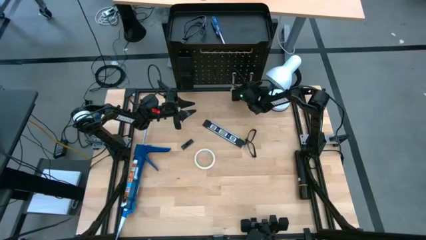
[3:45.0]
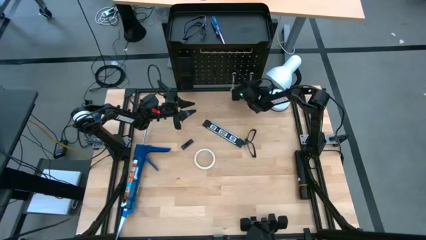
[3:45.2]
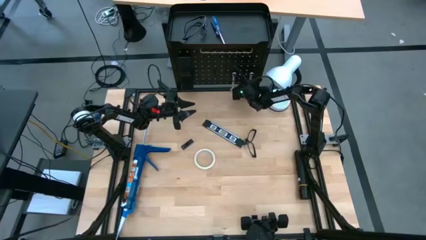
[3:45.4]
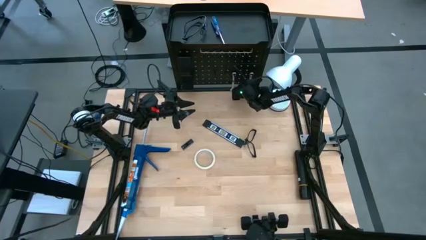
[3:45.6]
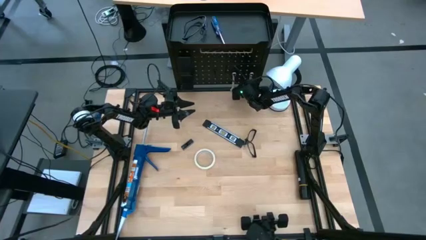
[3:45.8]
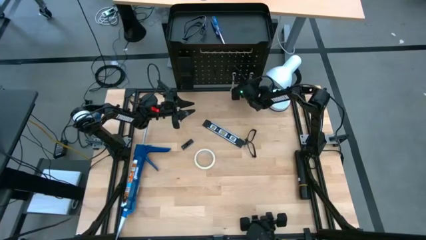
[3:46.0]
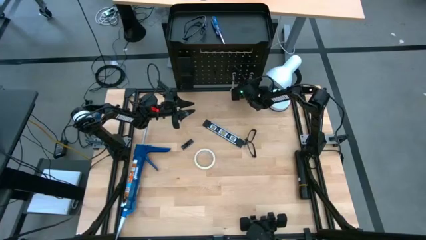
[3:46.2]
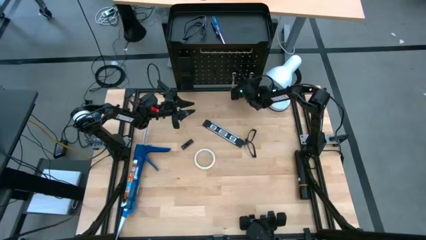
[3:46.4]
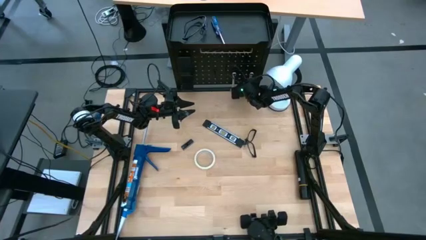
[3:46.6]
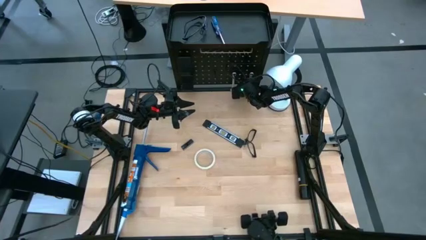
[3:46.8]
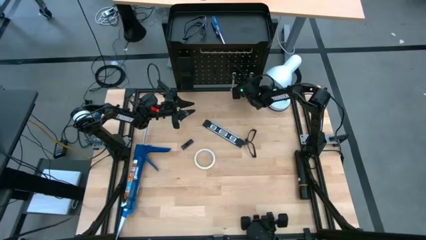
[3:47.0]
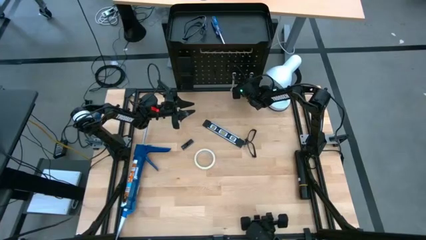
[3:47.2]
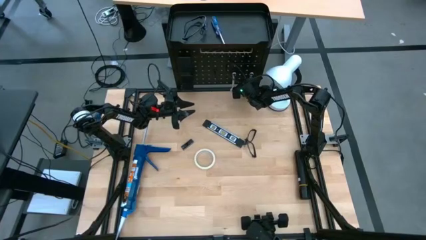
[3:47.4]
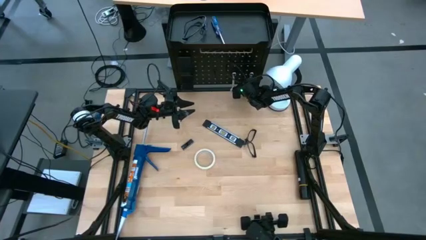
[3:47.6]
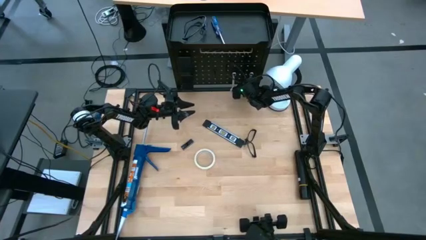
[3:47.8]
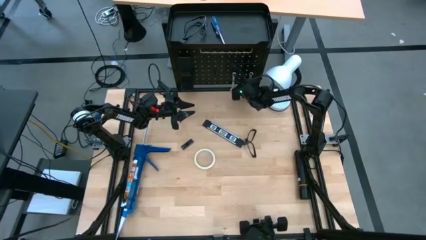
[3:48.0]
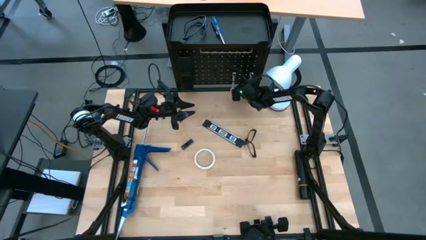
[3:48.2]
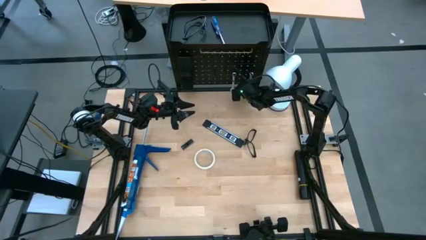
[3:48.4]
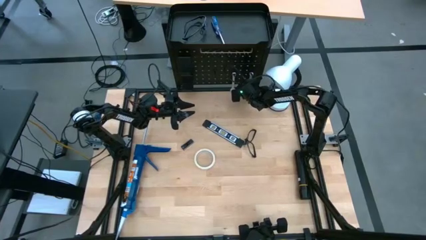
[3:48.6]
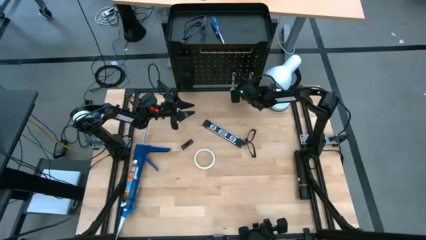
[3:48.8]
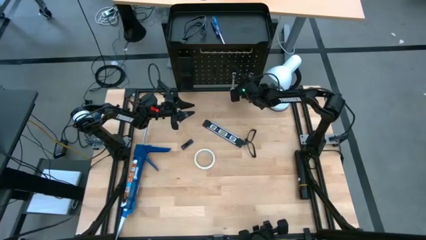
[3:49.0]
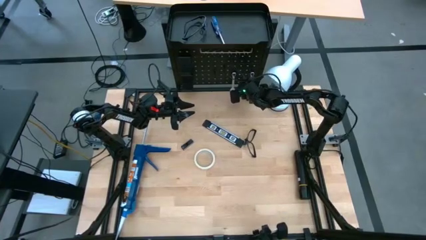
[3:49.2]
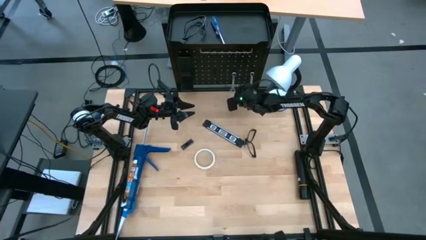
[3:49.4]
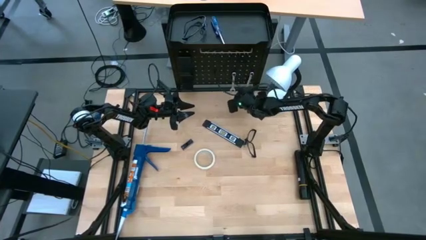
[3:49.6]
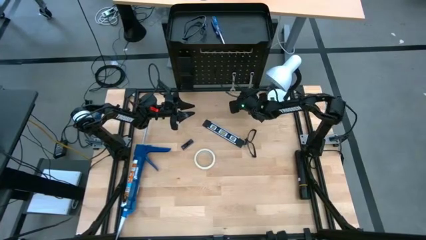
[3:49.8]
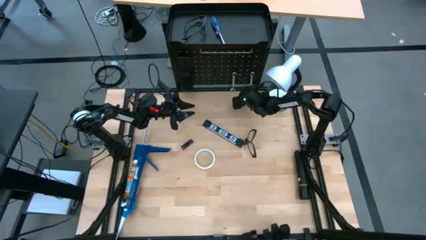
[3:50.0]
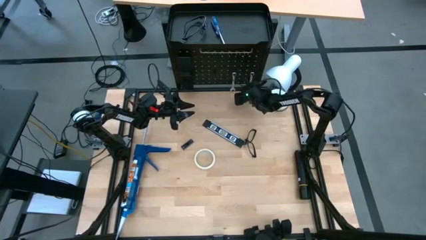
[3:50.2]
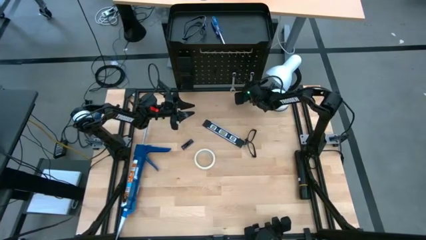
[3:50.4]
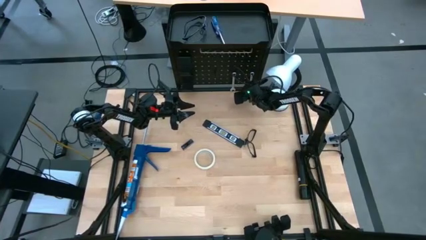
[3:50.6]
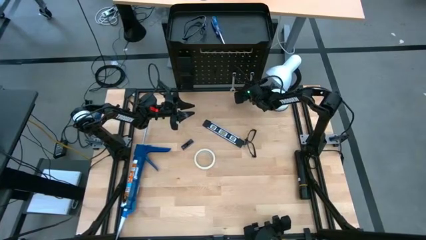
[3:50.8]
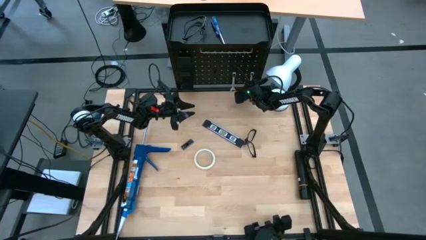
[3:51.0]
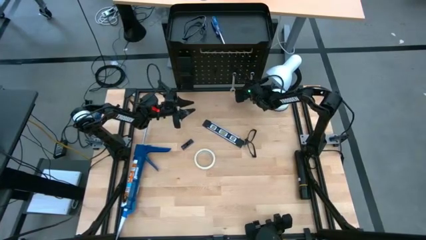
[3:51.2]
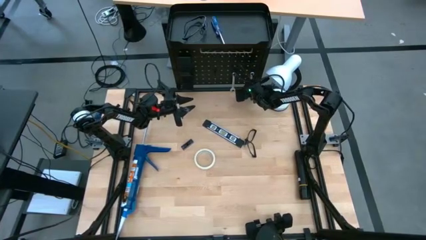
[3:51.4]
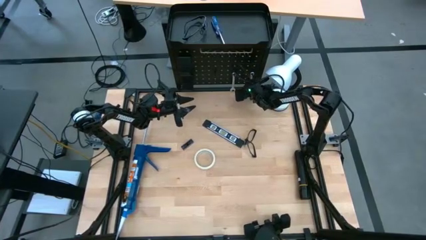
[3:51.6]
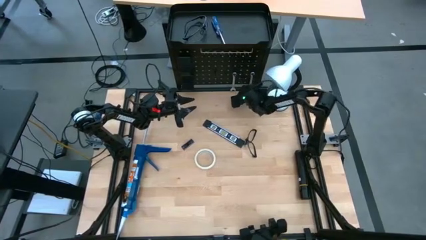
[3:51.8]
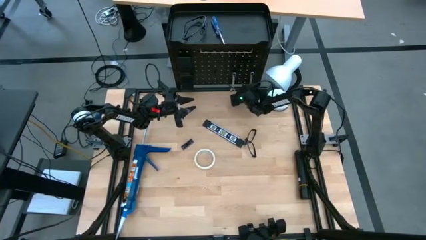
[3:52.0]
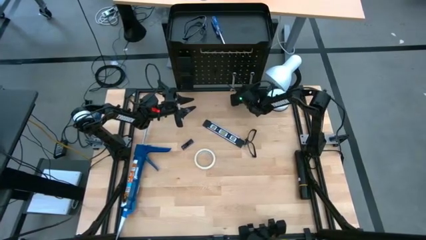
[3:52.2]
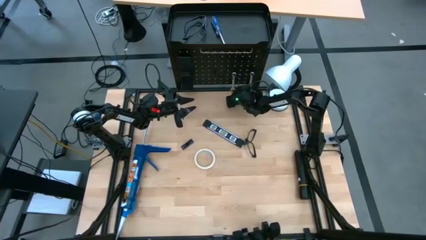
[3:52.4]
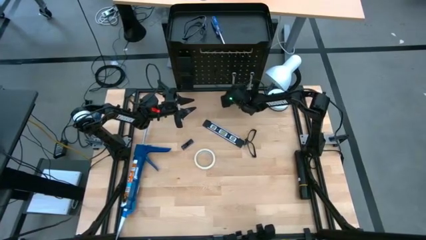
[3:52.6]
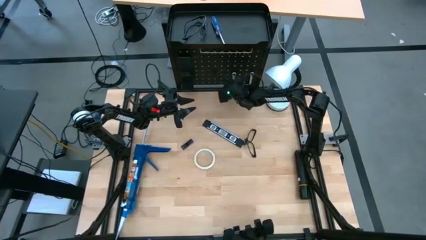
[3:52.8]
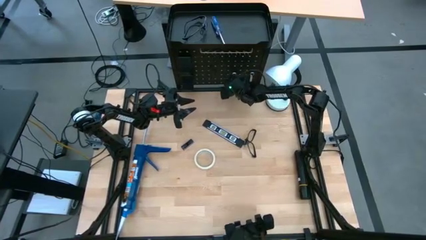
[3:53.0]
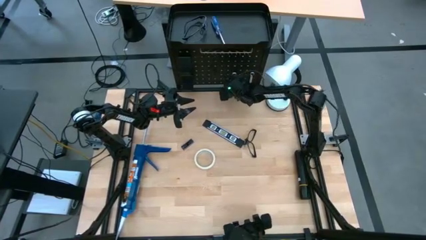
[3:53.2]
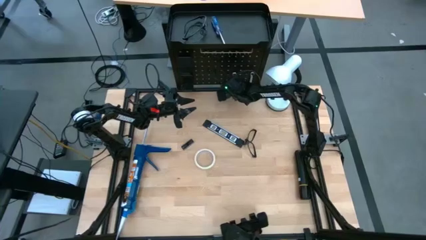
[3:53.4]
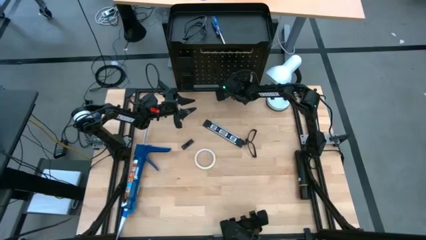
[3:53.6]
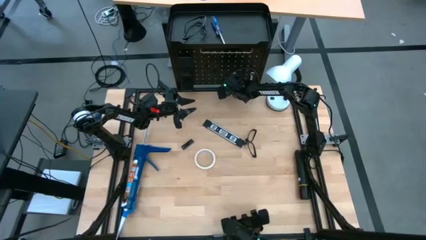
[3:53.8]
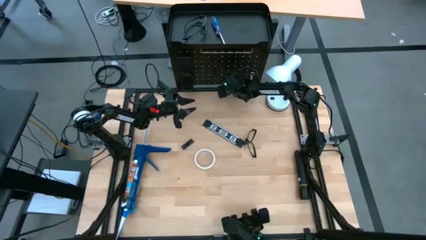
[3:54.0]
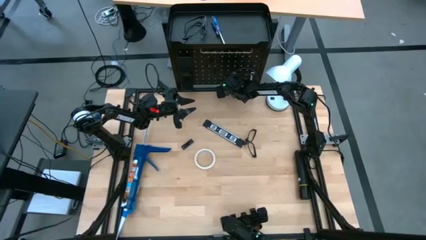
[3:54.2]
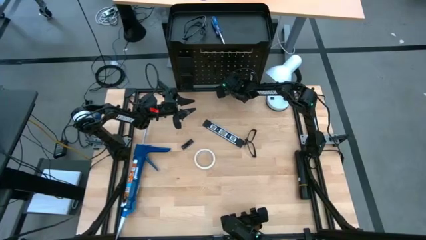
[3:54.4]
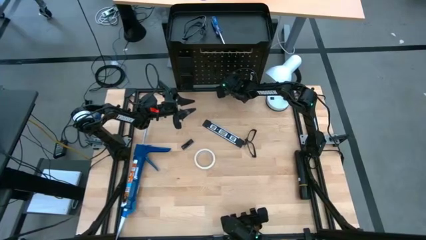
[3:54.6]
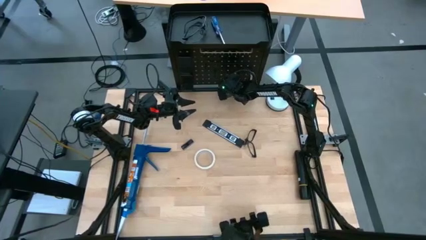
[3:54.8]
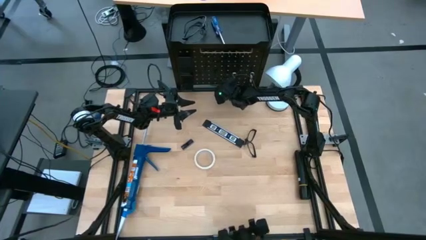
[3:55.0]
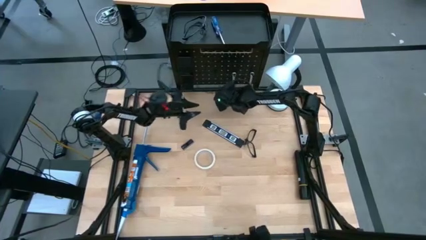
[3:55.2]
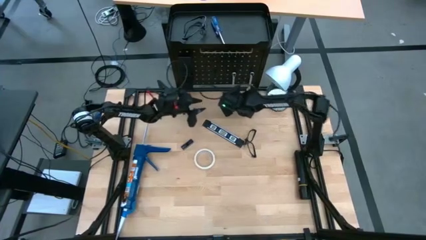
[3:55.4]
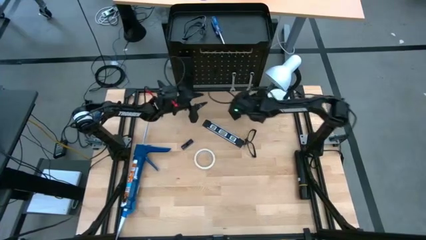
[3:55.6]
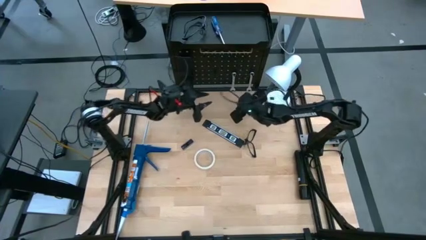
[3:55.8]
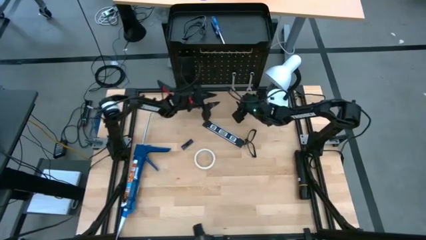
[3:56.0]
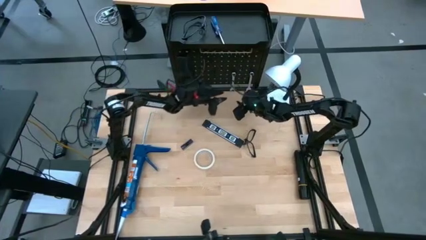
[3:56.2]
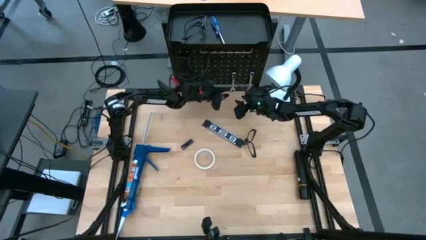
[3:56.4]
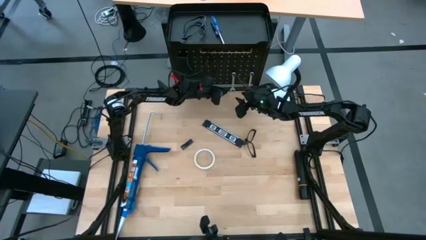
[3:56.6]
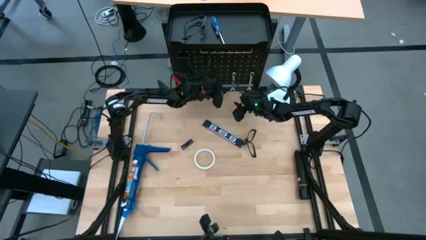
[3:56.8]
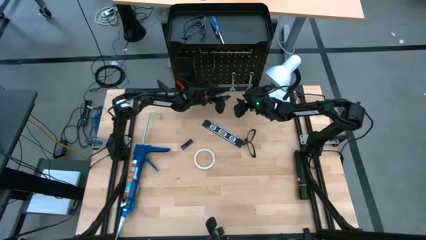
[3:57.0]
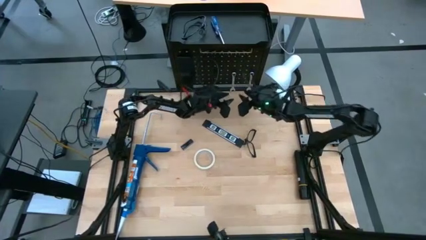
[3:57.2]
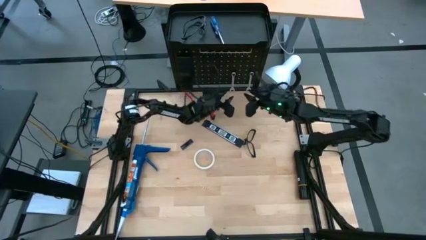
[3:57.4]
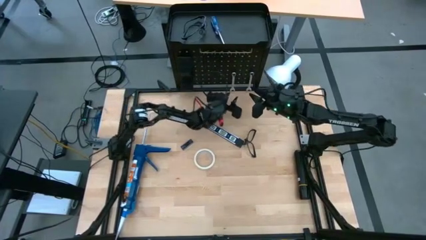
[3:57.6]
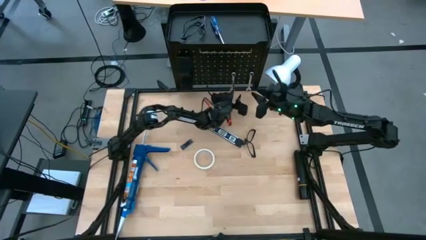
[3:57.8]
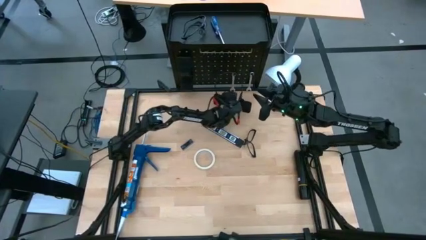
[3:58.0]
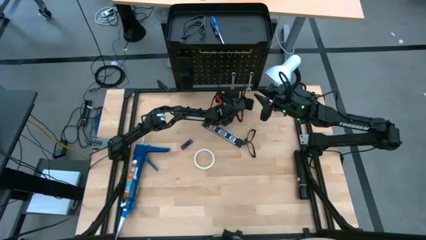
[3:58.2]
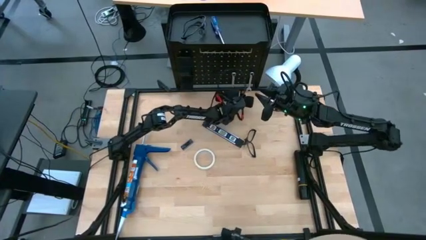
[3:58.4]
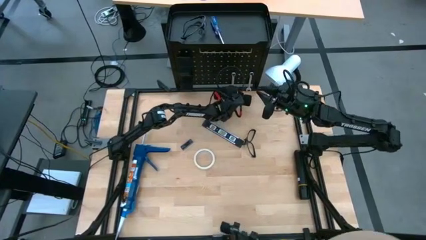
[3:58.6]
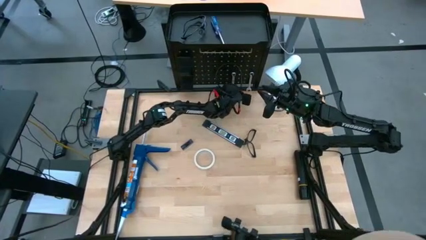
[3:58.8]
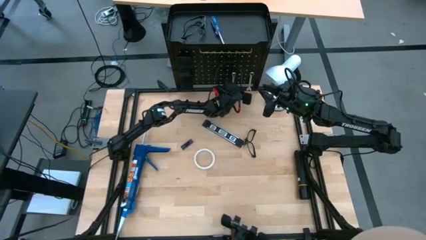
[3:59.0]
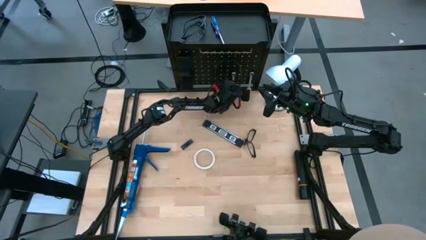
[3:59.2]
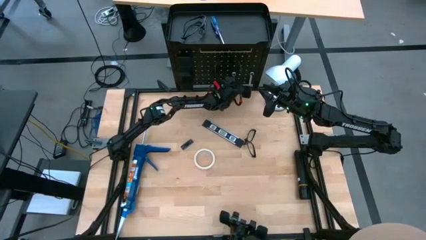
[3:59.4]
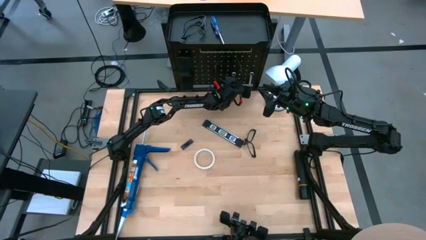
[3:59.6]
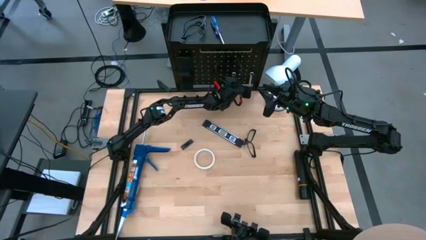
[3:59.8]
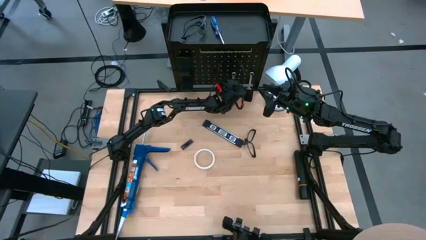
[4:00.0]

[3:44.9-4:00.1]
Task: Hang tools onto peg board
Unhang the right wrench from the peg board
